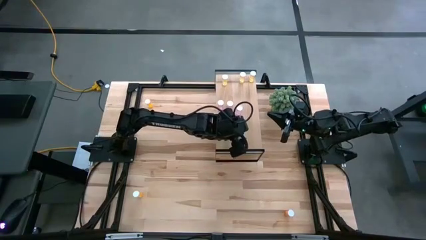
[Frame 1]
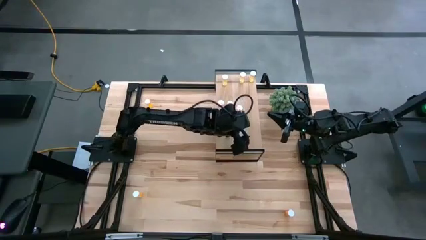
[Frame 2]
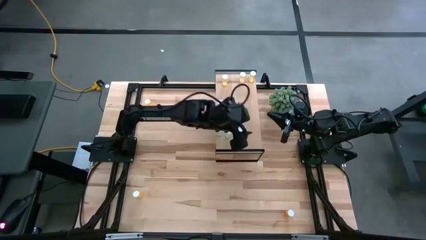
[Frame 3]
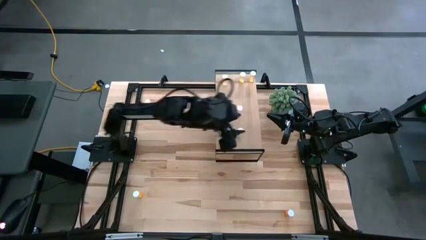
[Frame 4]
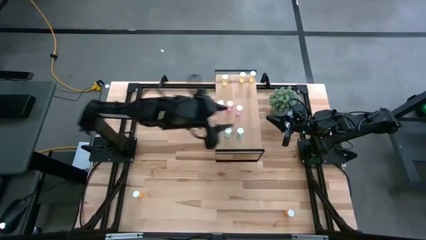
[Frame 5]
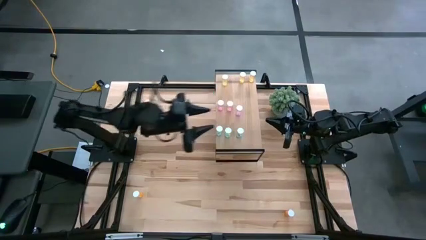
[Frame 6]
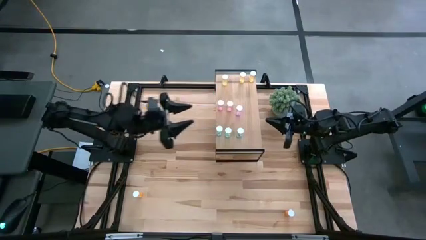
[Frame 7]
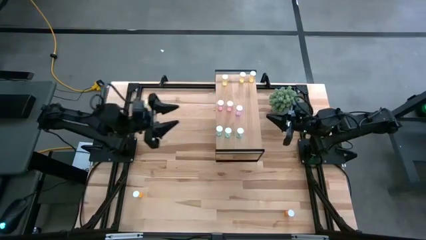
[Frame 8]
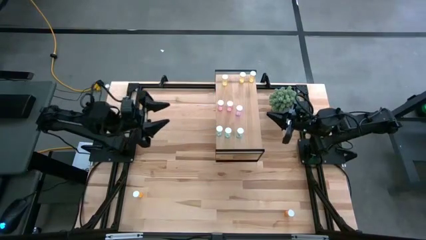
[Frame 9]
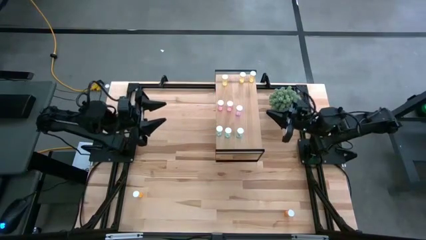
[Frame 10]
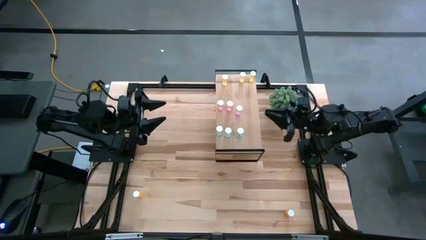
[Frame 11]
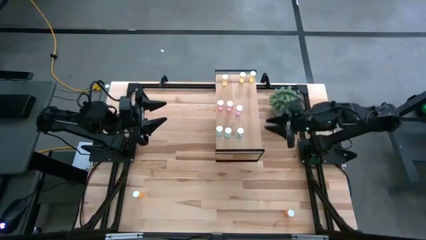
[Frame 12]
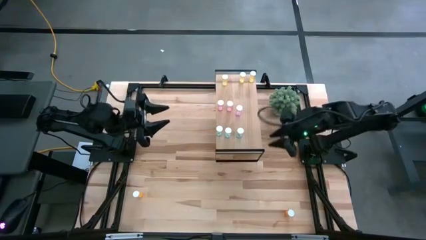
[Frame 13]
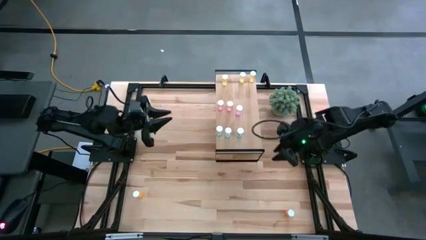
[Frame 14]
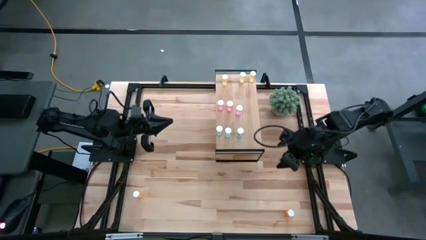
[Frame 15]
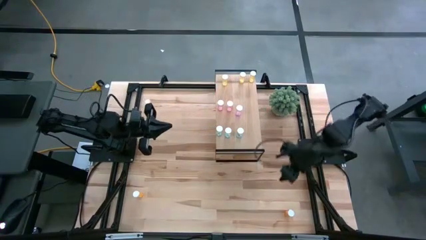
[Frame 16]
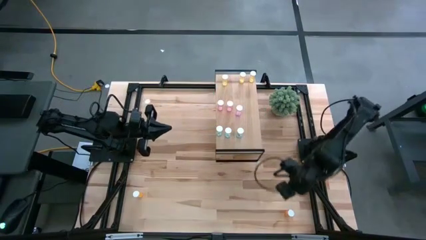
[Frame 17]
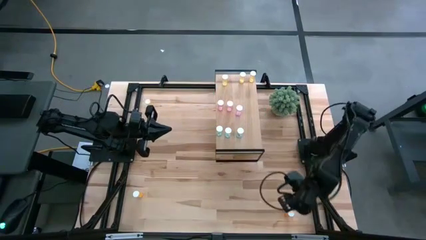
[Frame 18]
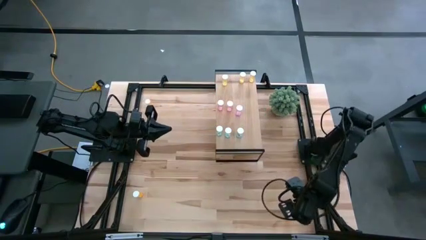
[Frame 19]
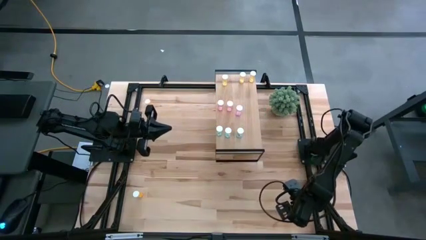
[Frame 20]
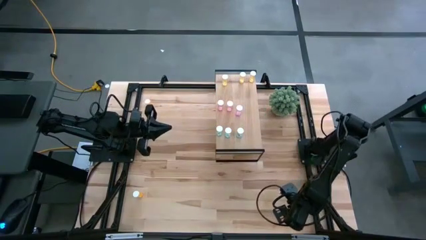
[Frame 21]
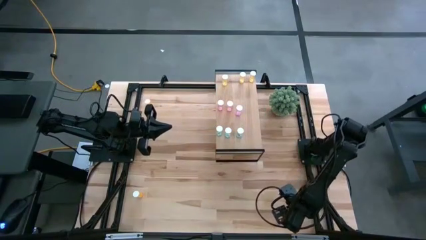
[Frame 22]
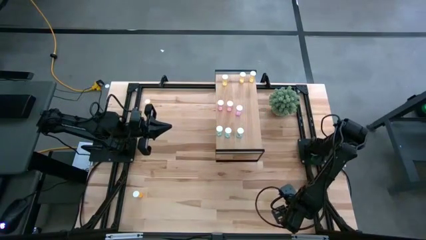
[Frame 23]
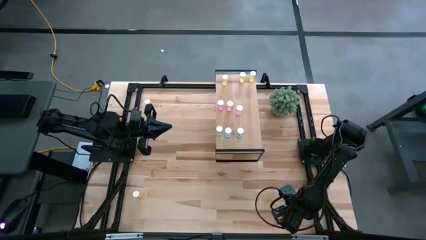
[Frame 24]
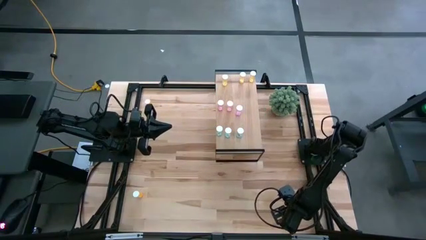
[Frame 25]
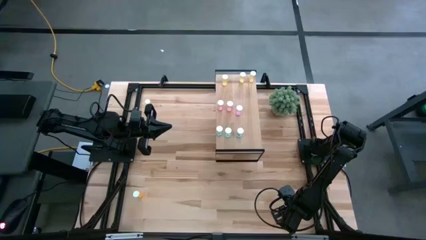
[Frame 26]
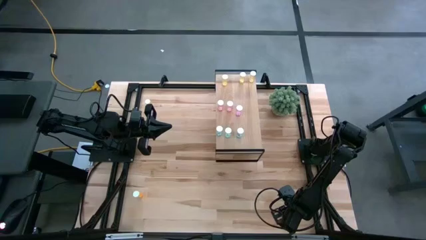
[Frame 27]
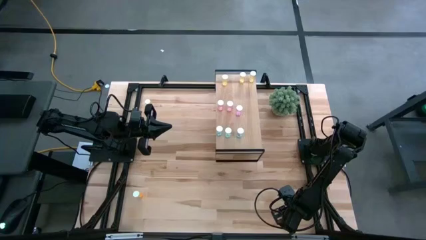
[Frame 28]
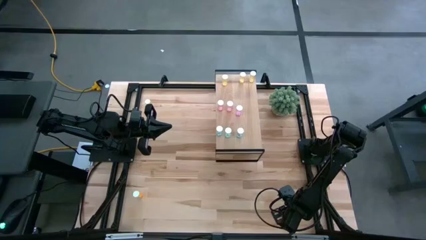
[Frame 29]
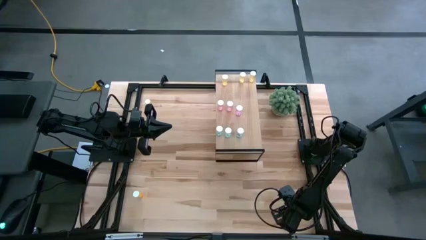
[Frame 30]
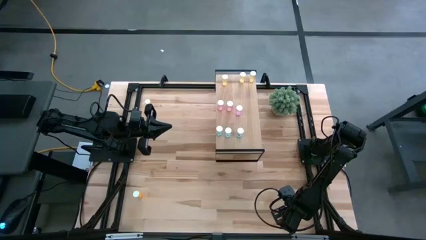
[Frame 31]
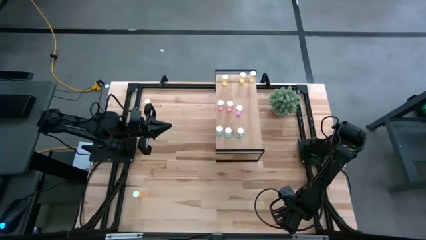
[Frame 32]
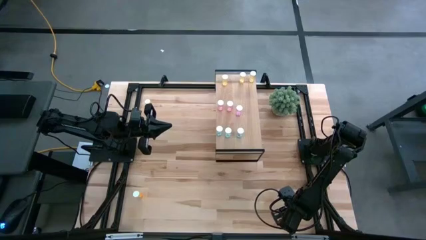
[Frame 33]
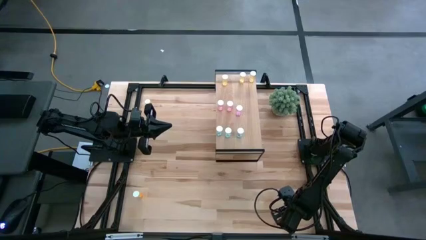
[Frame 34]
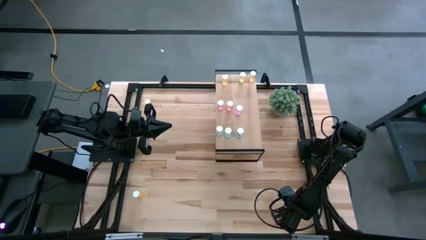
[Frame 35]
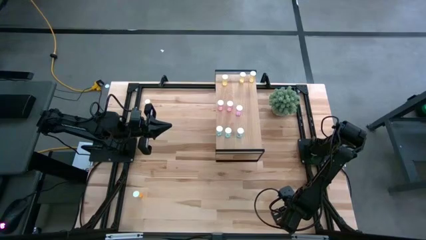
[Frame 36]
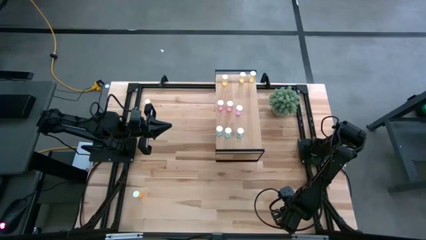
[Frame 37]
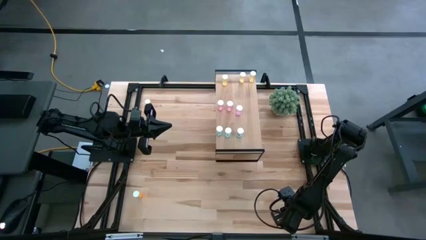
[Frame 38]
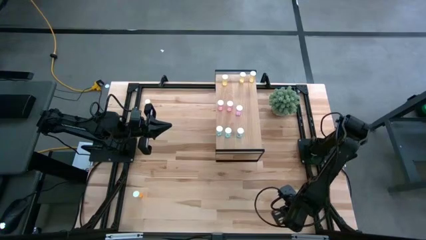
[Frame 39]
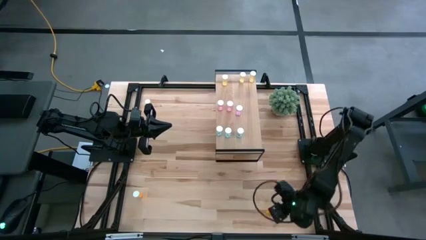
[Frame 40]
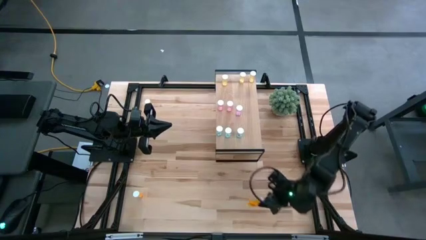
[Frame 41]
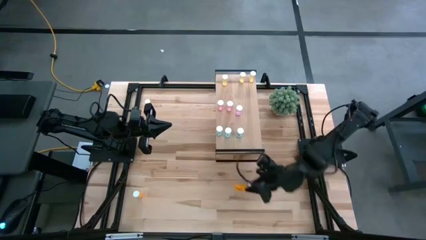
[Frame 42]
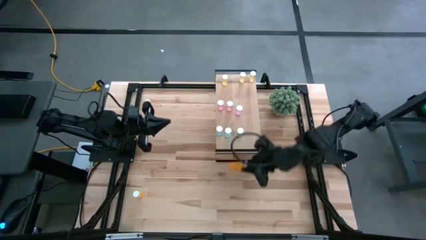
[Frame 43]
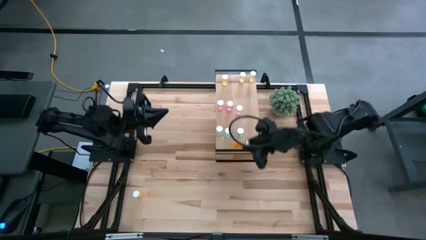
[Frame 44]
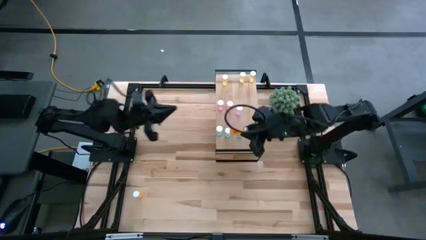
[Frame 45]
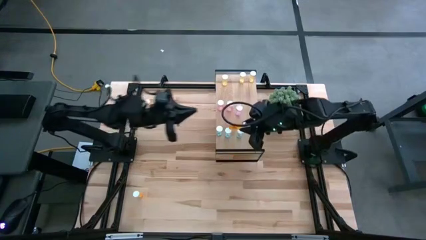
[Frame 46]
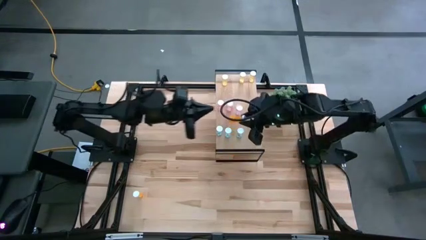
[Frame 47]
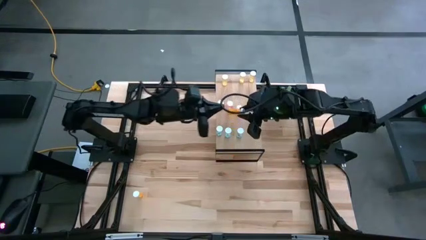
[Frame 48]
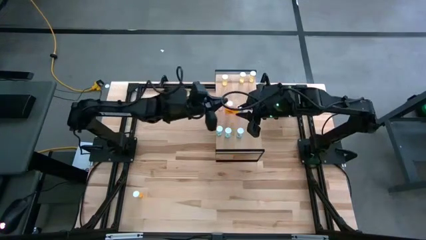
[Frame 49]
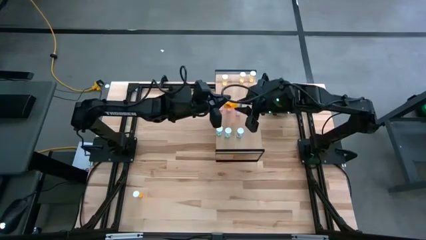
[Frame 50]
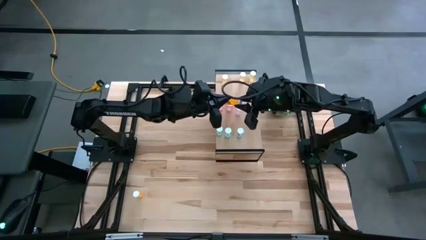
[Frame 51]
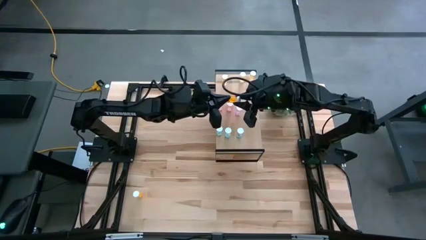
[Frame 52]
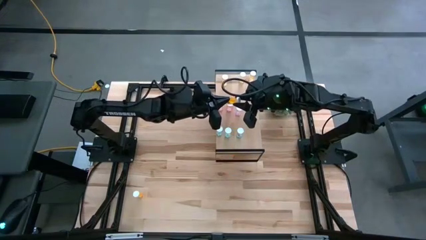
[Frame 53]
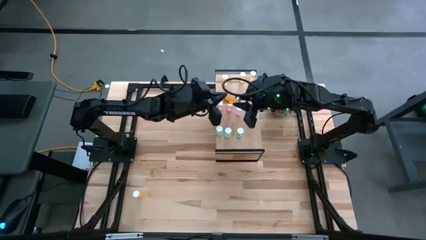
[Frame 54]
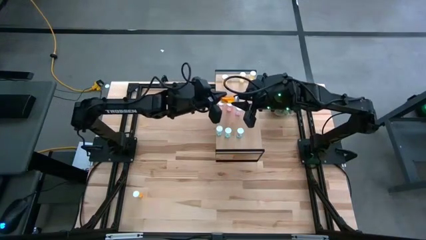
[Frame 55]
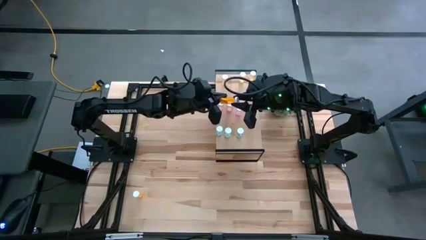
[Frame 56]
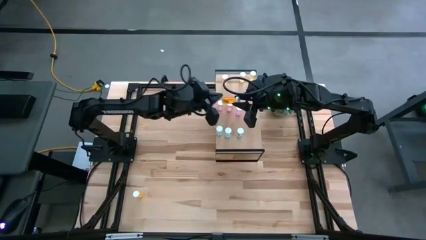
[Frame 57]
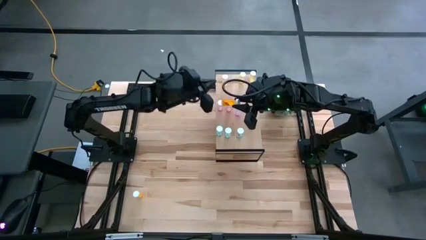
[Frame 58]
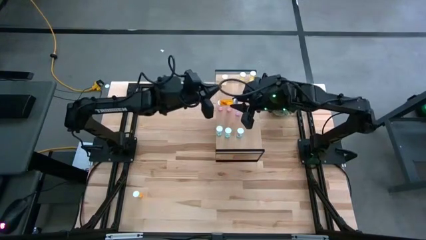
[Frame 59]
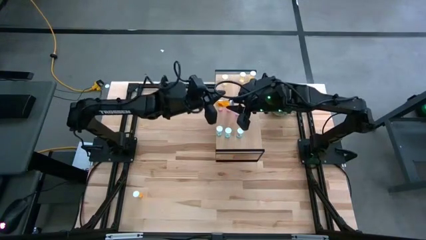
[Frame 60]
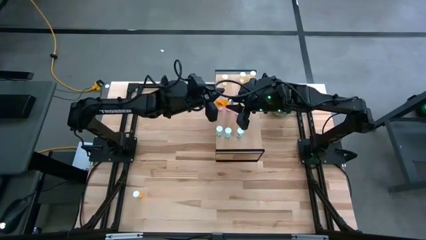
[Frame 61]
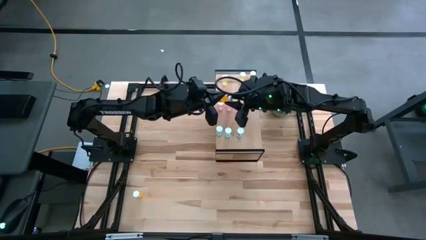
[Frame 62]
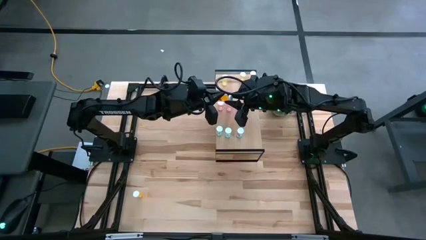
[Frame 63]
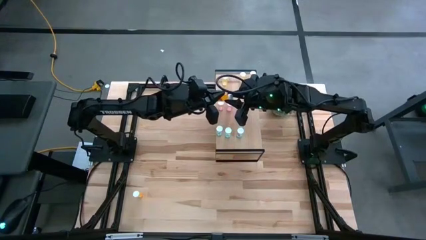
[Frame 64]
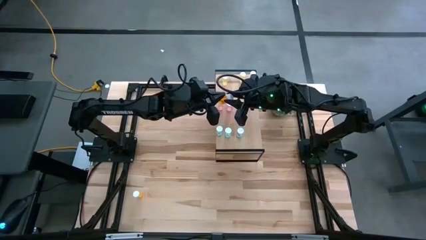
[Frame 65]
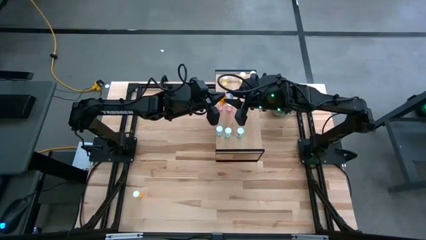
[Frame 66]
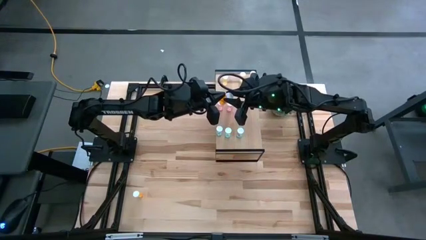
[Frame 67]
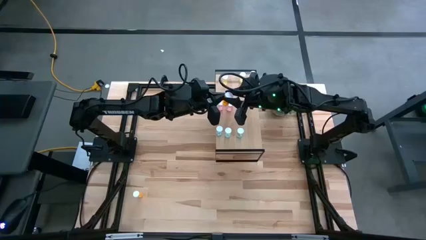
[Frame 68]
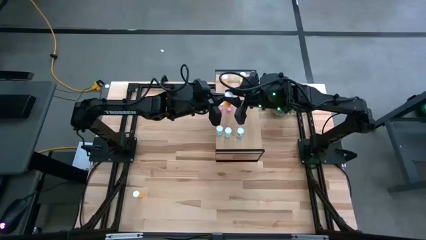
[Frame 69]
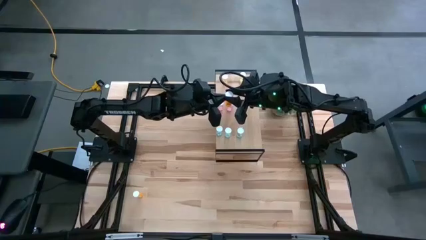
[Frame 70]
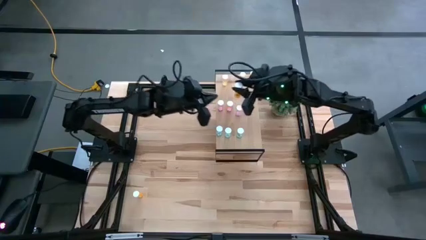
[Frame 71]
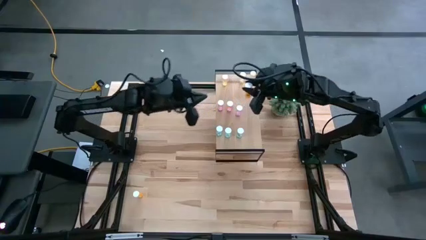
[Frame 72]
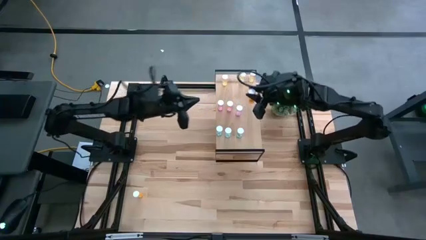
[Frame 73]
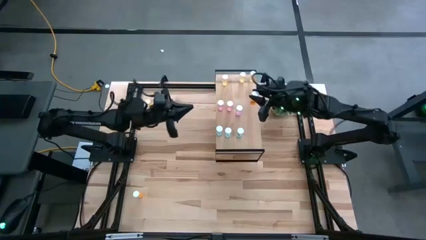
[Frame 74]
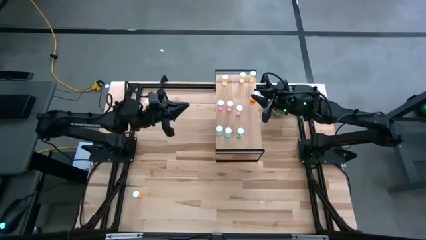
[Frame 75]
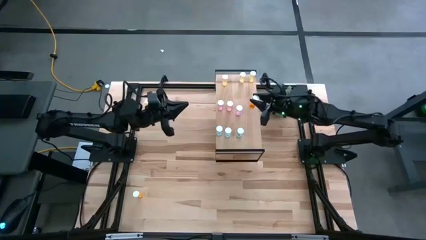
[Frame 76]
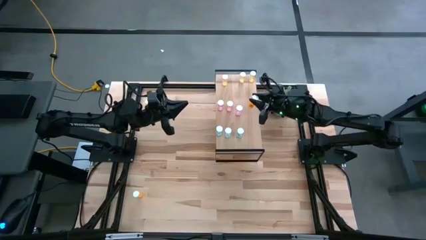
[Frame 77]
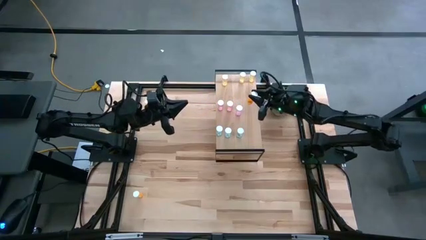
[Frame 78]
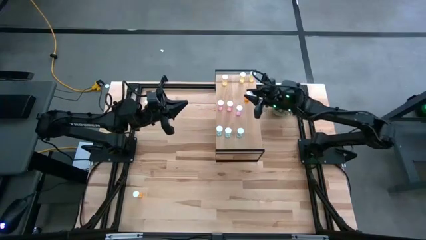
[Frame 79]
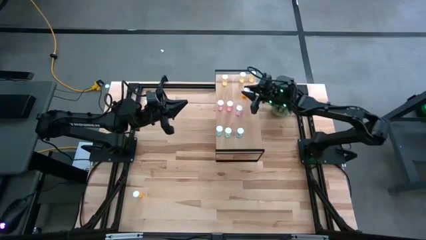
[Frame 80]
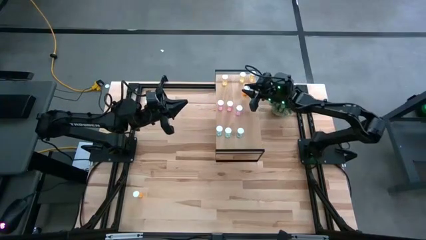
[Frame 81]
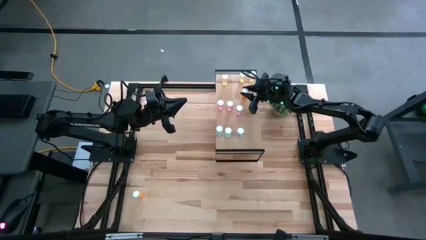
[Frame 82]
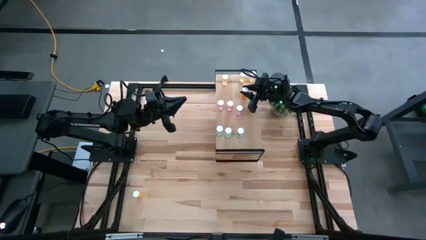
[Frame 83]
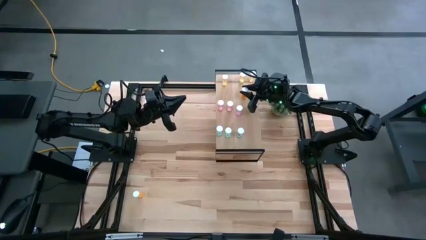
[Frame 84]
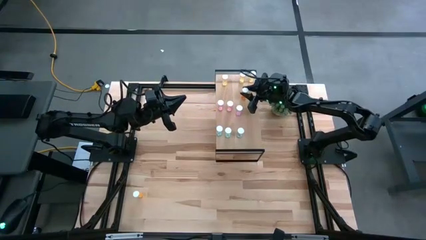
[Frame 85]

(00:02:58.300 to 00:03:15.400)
Task: Pick and place medicine bottles onto shelf by color
Put the bottom orange pill bottle on the shelf
